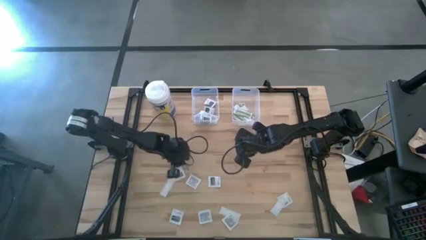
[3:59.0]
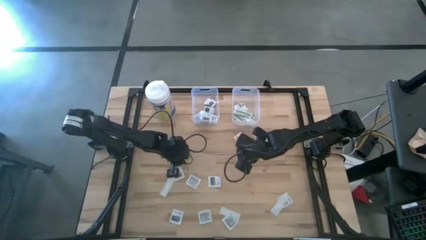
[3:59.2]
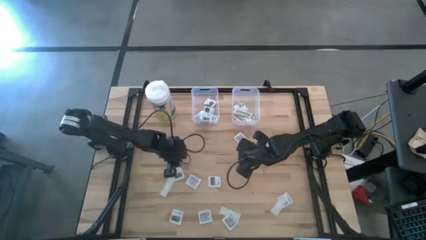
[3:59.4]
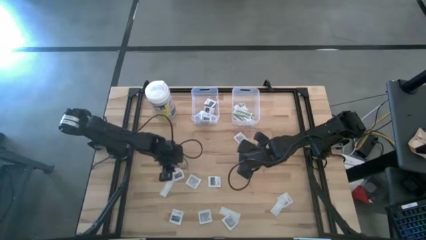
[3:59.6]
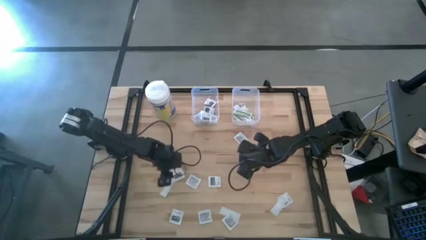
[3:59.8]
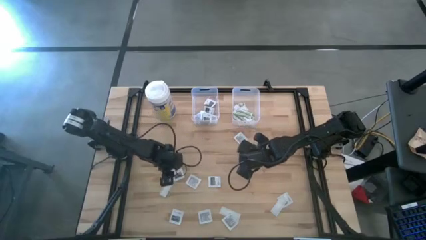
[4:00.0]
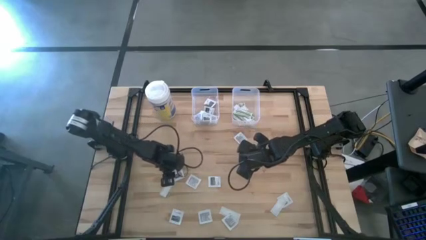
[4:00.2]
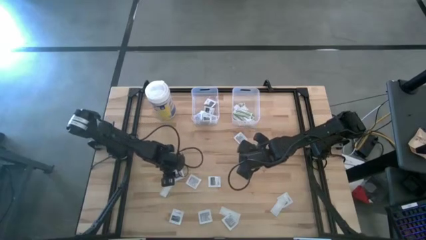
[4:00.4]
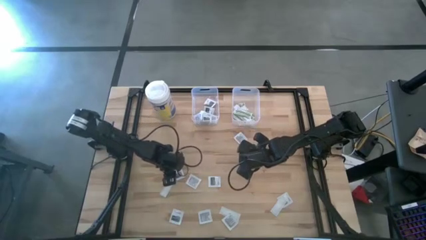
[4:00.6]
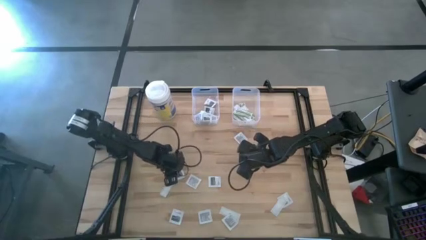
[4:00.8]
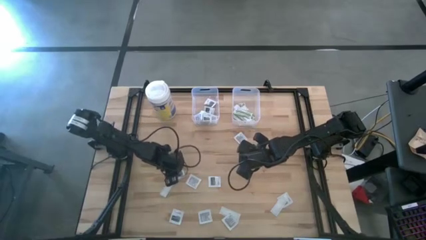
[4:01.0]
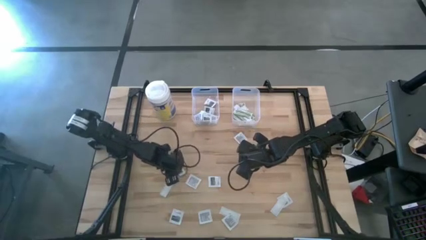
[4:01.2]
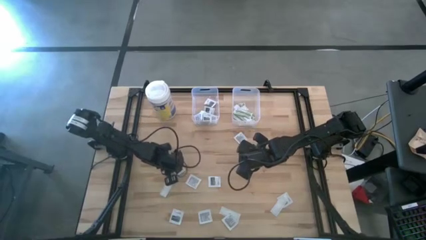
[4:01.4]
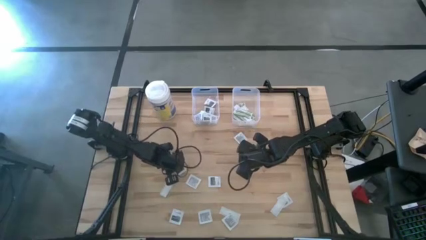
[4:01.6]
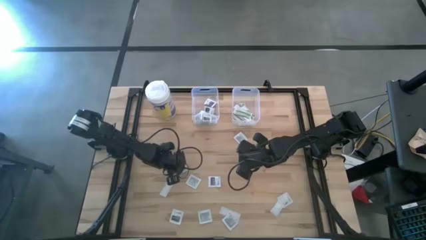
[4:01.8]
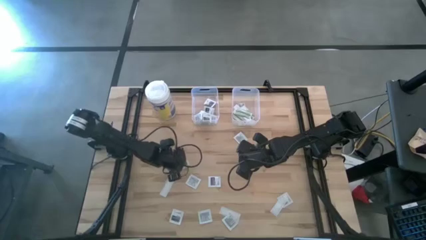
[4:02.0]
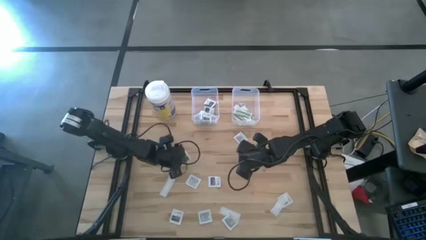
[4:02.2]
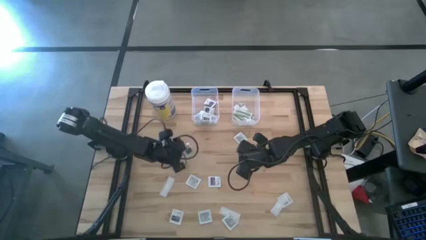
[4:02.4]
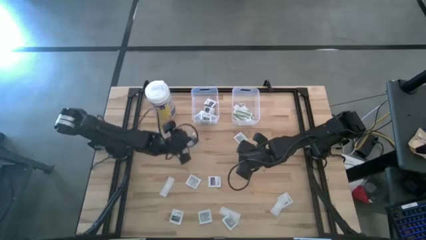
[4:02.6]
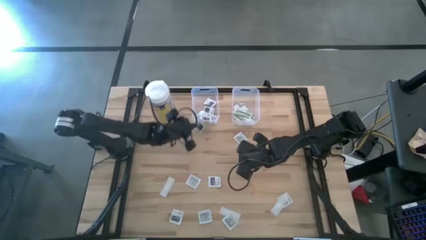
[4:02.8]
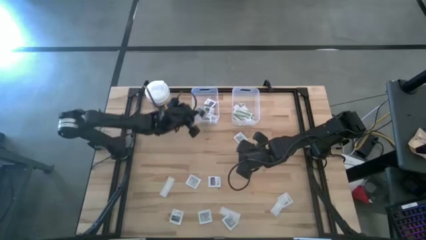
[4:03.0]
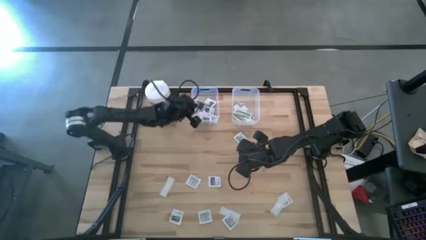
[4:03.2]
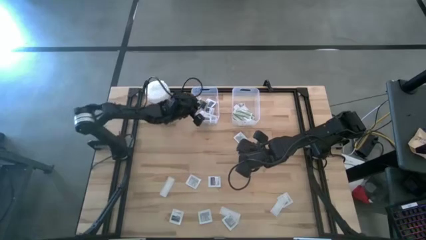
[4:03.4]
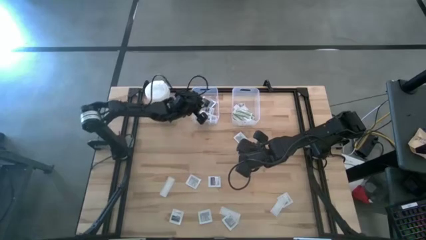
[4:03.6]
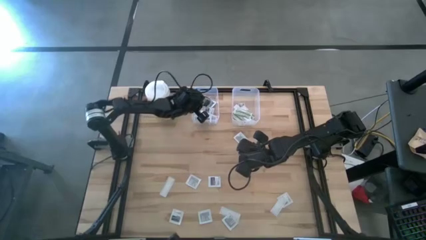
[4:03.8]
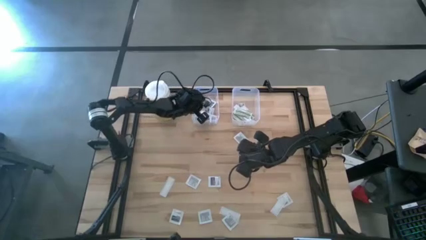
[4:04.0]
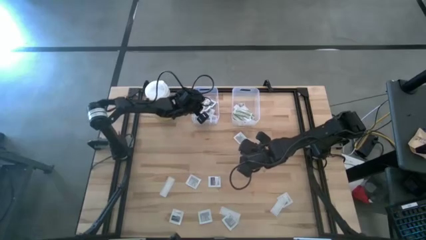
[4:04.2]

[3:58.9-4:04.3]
Task: Pick & Place First Aid Supplies
Put the towelette pack into the left transparent bin

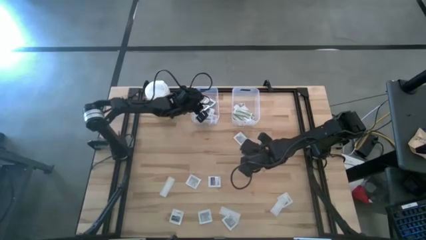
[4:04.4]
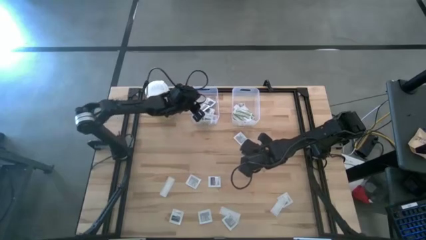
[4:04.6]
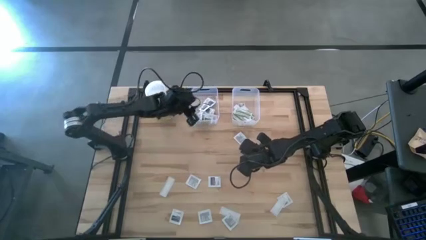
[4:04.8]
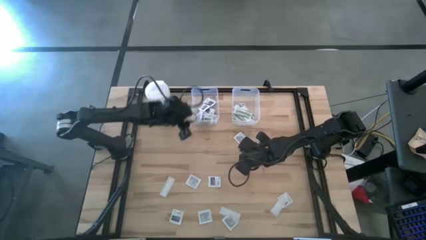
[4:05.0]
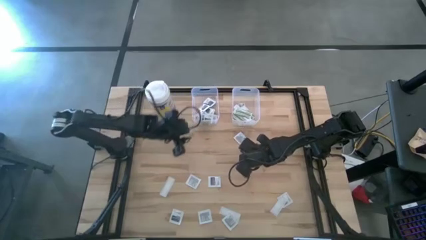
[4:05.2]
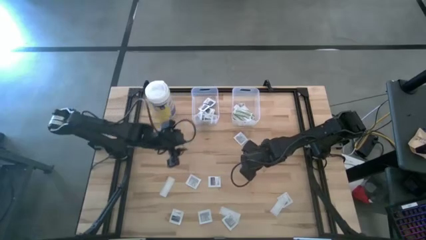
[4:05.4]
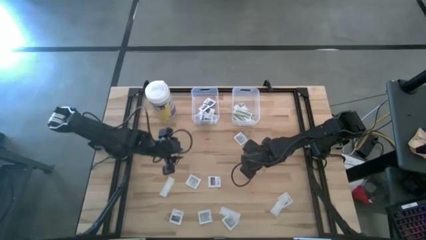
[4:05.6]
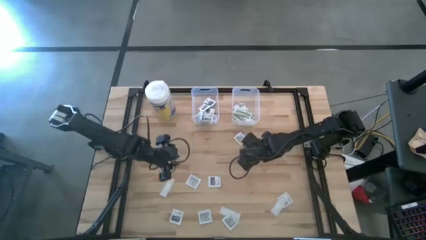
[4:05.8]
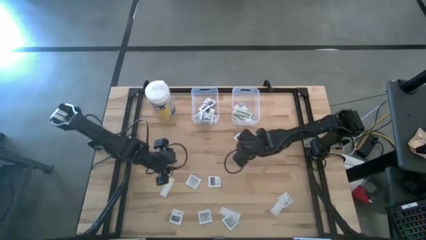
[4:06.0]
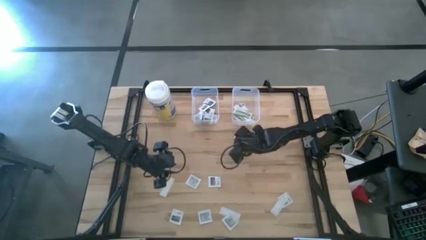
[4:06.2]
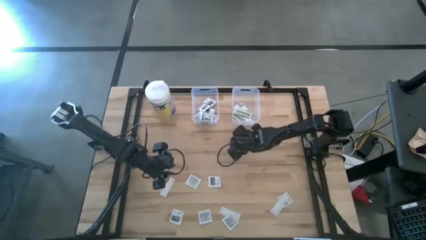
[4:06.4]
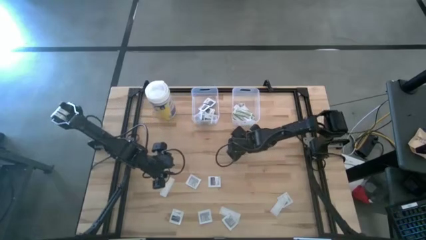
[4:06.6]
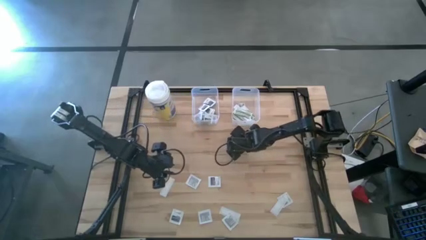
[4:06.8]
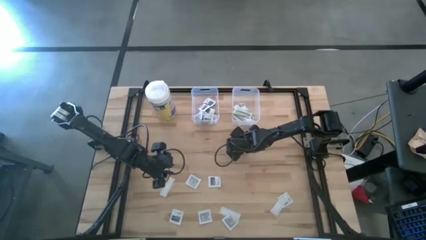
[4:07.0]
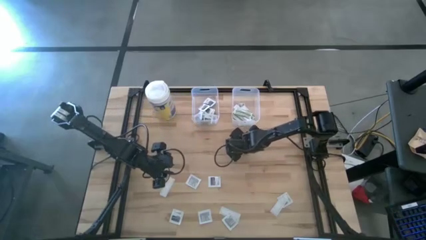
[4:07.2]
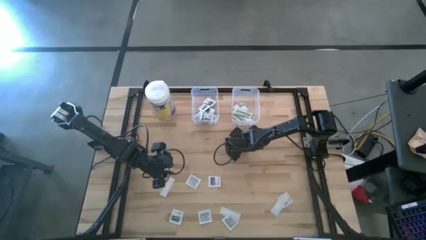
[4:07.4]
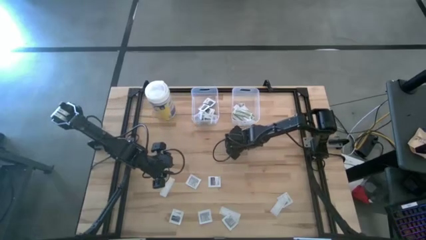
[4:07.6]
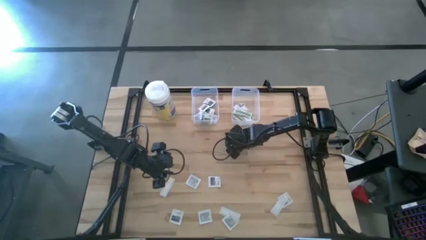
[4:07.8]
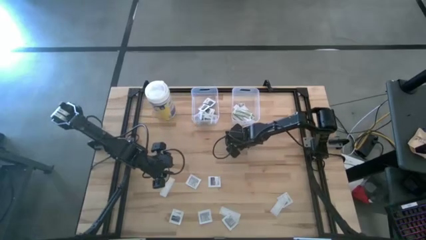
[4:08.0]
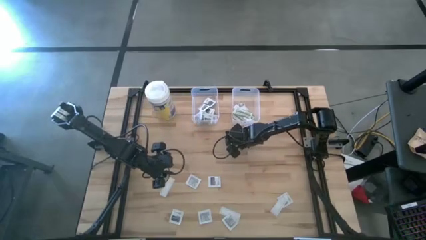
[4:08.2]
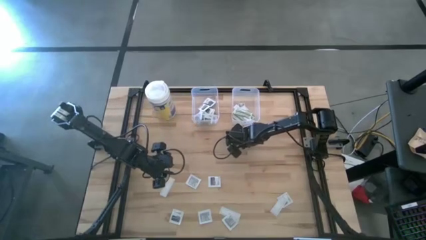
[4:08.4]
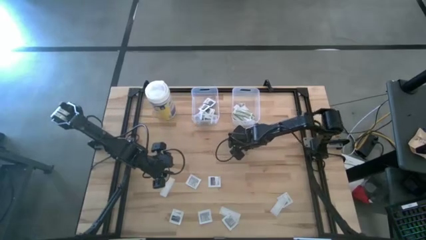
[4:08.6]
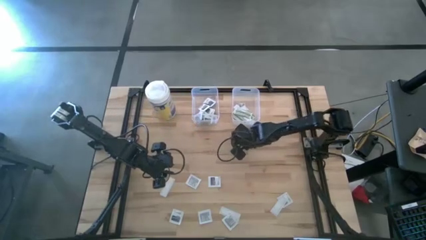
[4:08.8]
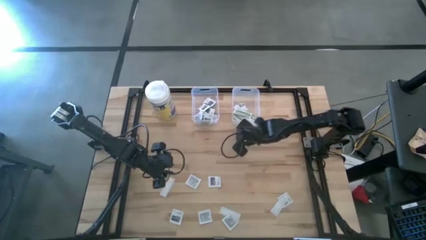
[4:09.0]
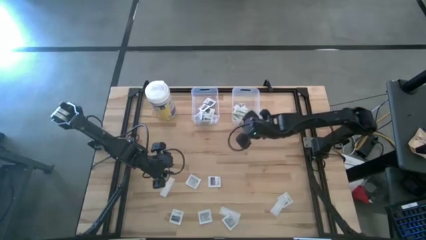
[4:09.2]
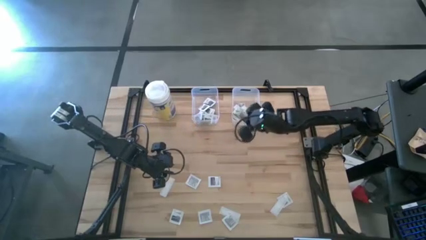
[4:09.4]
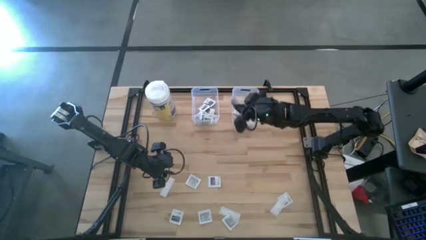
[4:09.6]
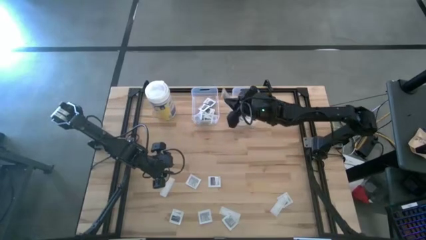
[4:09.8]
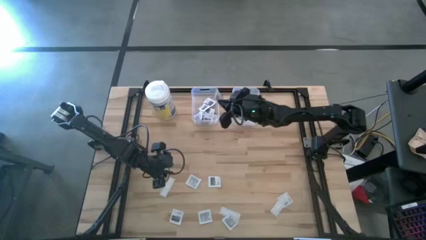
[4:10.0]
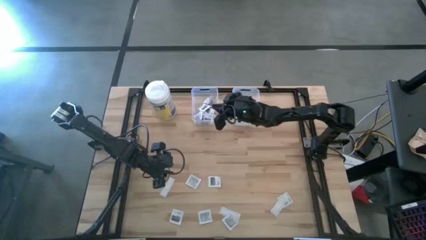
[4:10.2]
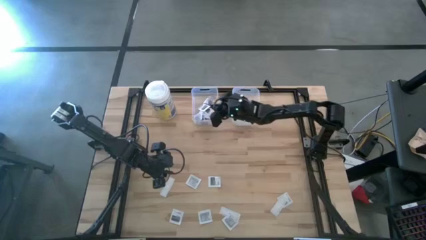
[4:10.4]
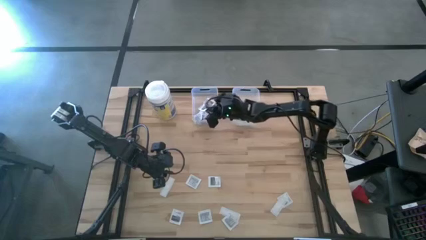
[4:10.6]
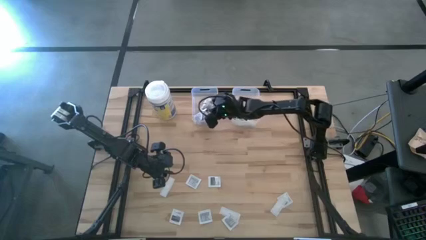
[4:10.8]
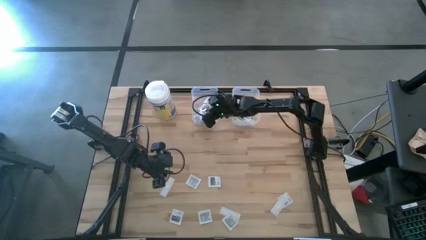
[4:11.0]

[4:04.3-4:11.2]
Put the towelette pack into the left transparent bin

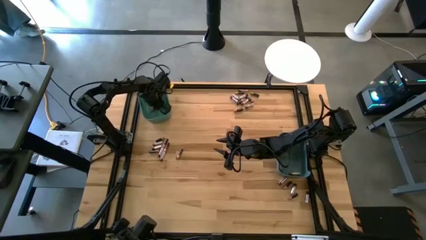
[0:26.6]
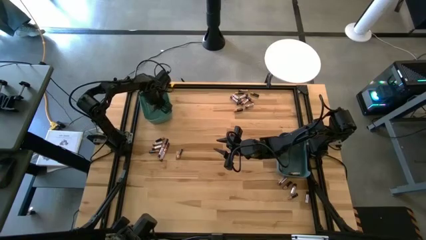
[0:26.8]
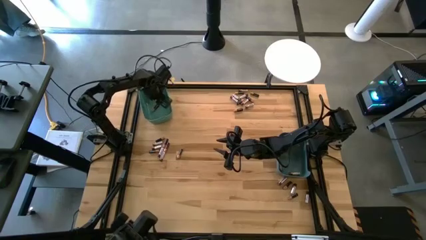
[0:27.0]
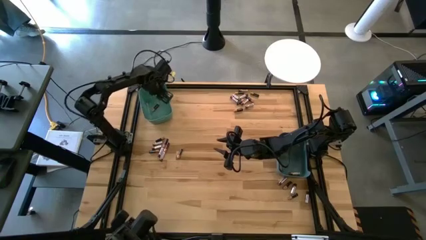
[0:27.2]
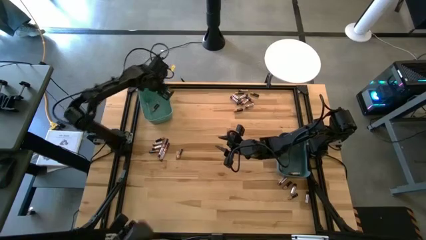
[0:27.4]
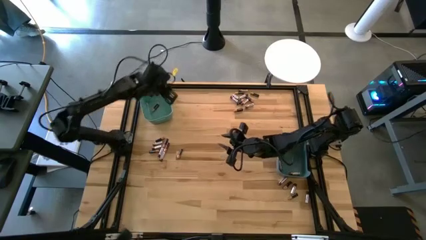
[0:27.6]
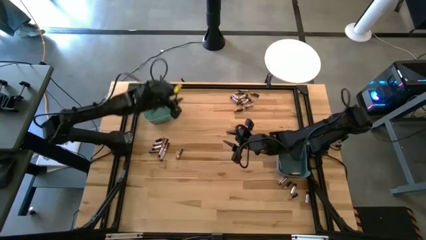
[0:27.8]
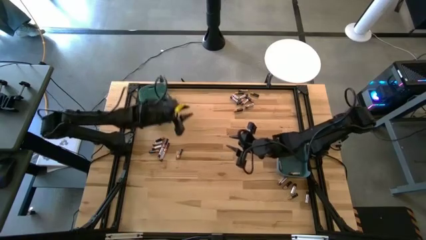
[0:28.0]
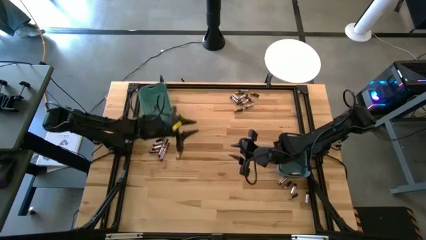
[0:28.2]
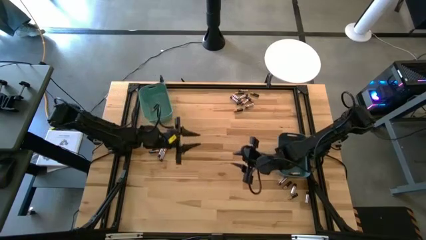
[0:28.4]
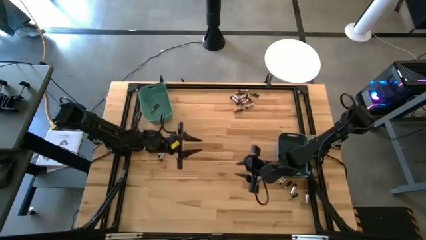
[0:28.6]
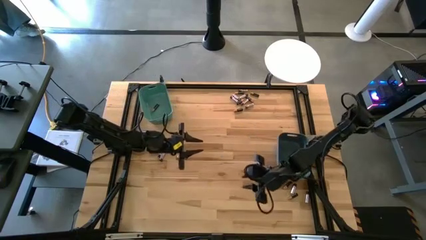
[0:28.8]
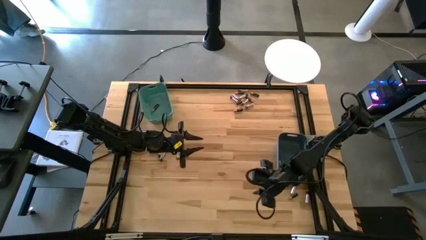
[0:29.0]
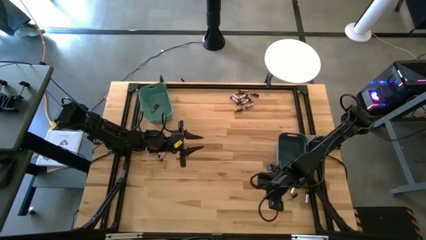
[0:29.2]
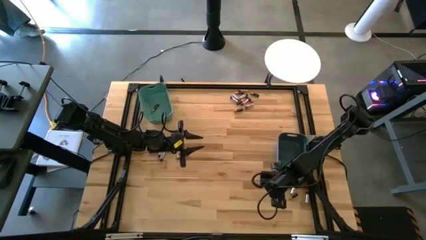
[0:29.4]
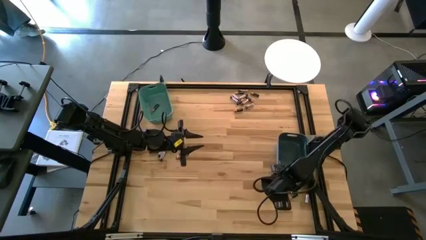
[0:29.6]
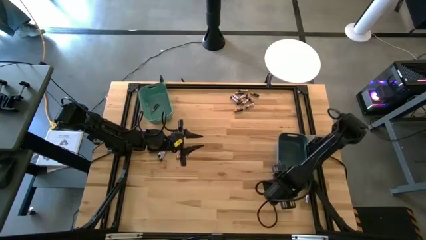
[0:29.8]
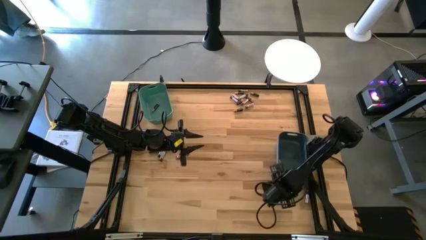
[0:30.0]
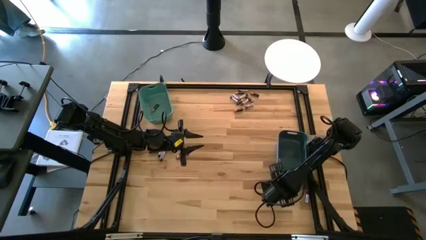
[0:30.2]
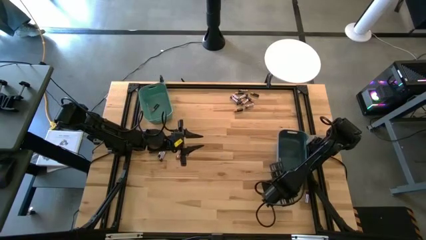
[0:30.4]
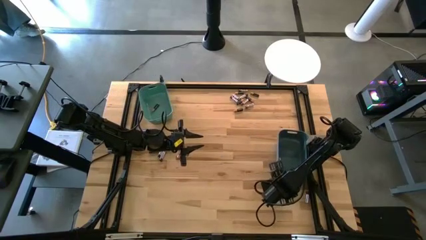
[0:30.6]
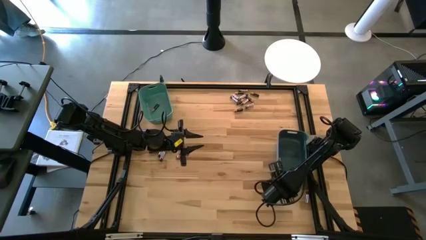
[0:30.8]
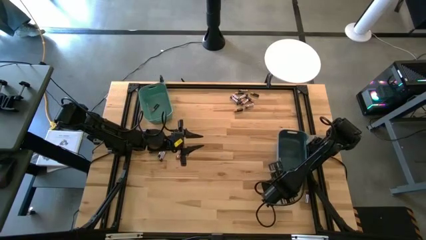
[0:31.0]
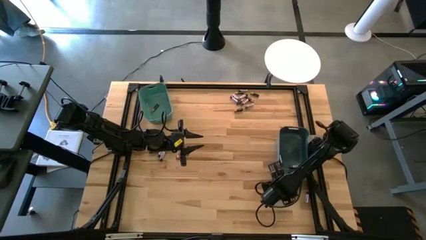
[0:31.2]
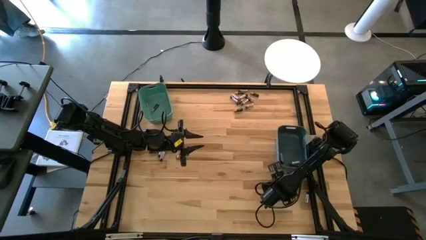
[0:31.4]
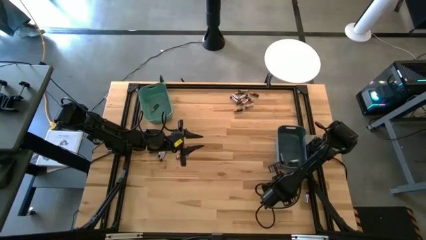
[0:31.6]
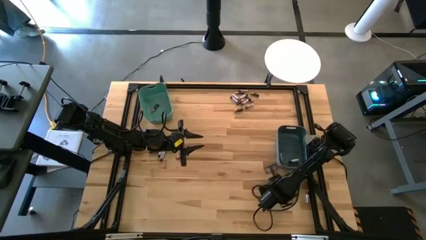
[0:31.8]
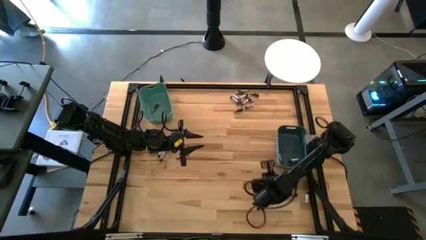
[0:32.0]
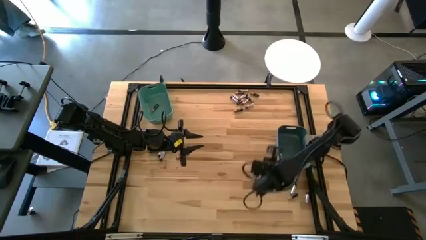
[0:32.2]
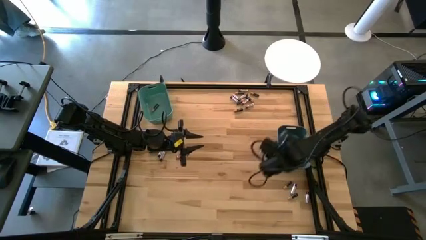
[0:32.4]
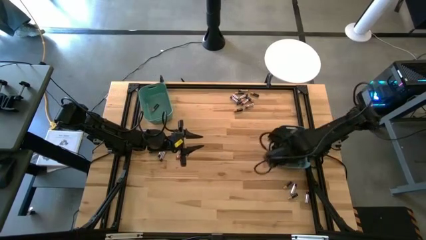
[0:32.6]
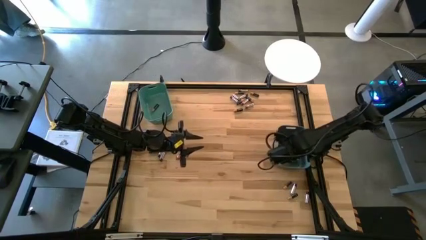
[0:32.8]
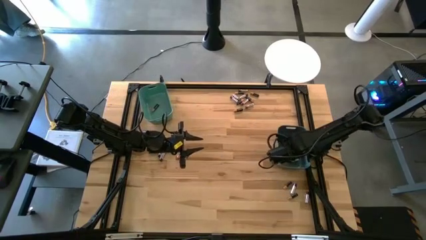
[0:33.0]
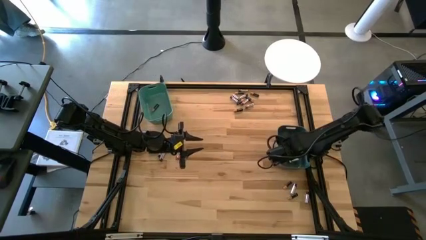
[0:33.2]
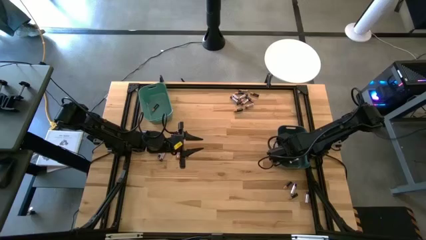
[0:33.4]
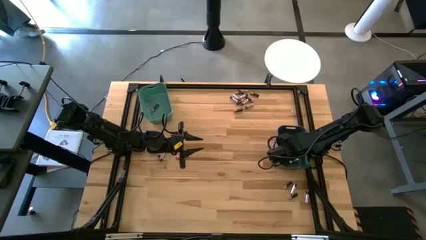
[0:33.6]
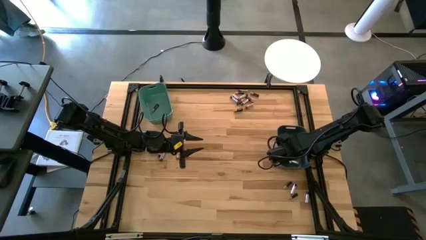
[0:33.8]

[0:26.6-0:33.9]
Task: Sort batteries
Put the silver battery into the blue bin
